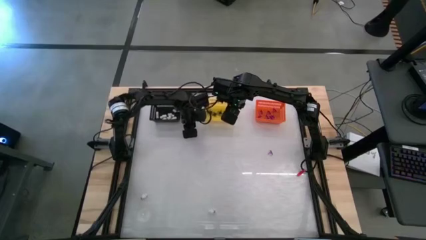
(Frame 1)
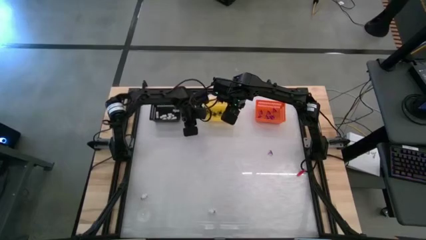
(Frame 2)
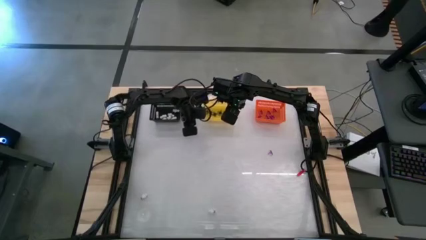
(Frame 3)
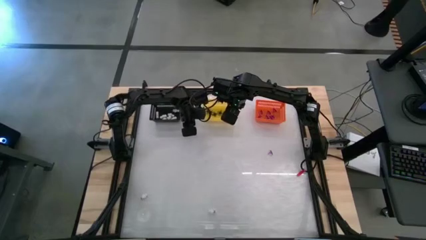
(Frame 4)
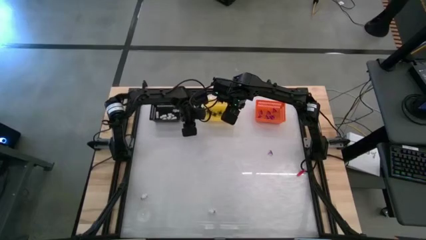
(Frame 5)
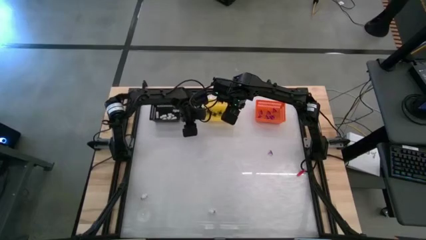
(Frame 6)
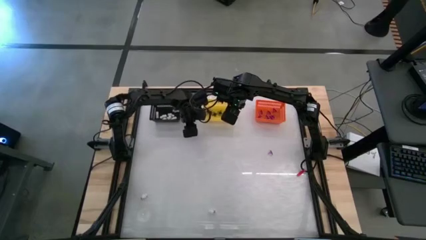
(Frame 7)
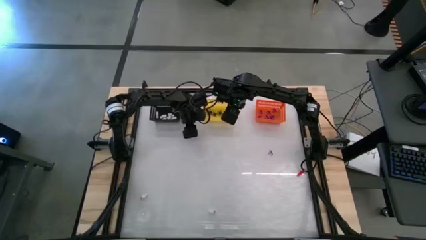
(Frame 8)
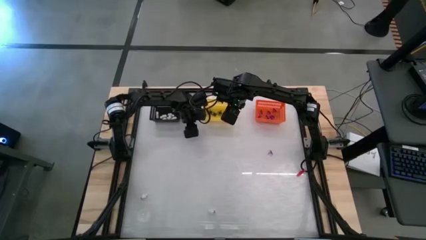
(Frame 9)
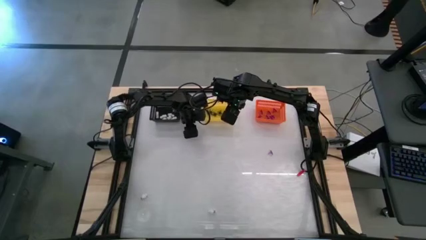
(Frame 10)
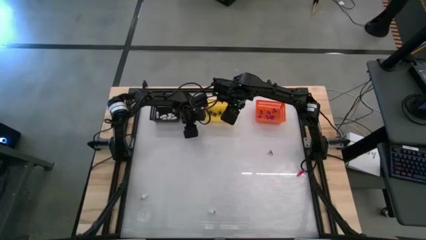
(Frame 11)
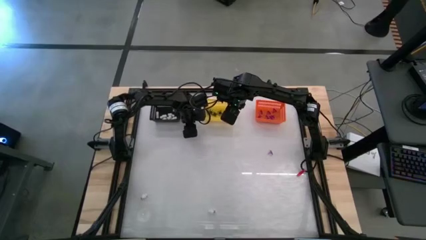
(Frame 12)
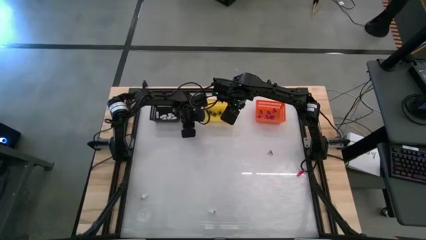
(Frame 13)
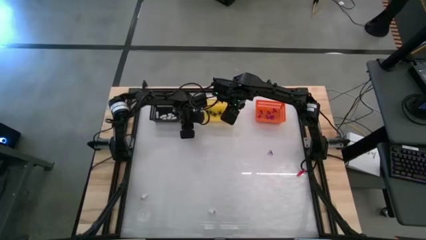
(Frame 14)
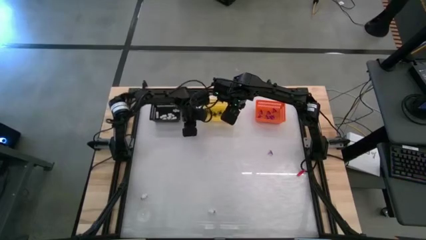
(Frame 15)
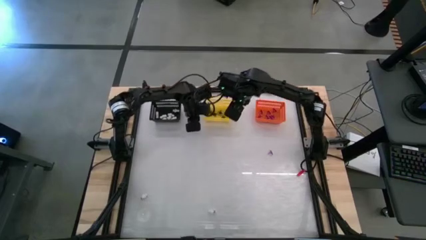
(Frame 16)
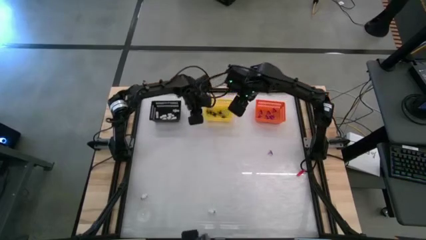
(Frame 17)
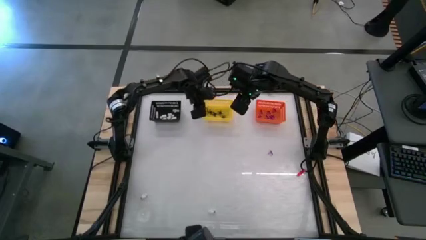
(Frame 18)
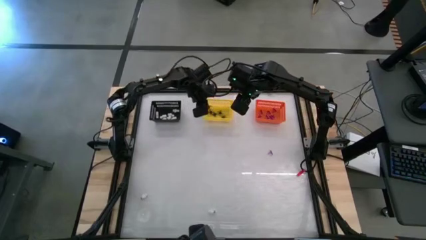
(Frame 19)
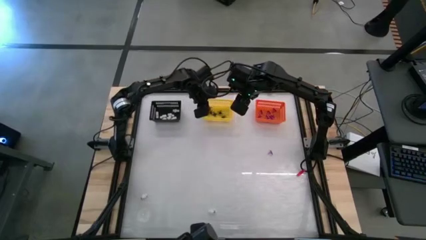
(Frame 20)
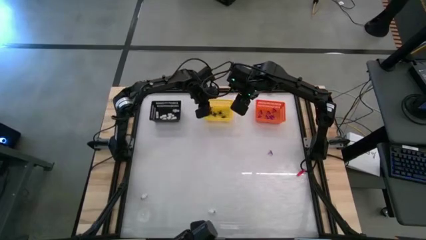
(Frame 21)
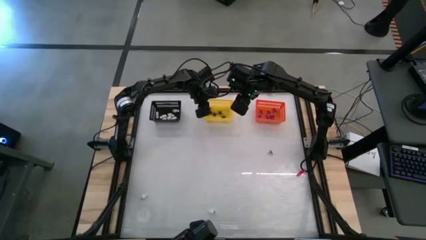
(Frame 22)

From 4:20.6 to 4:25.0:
Task: Sort Halloween decoration
Put the black spider toy into the yellow basket

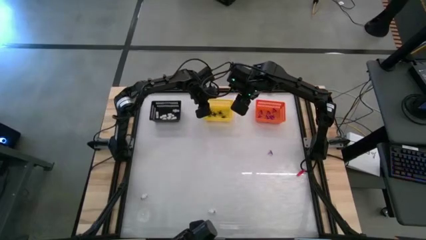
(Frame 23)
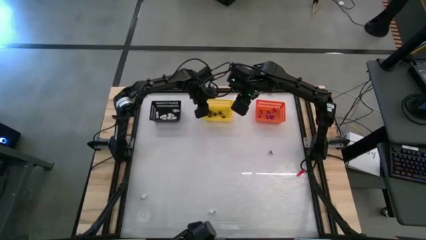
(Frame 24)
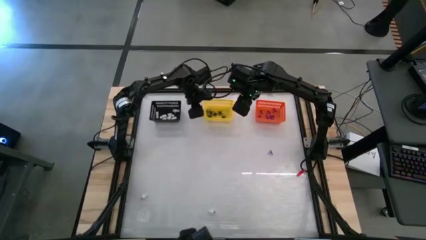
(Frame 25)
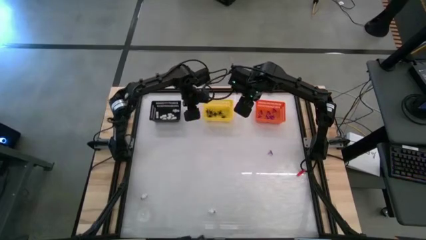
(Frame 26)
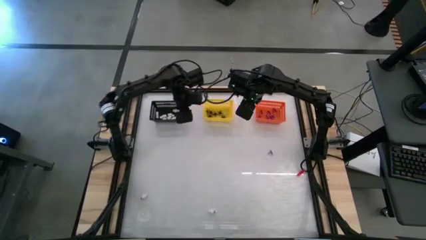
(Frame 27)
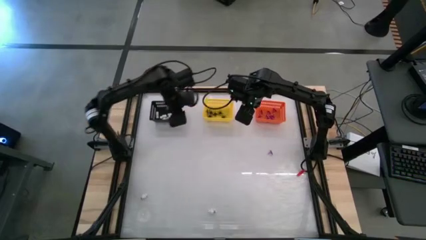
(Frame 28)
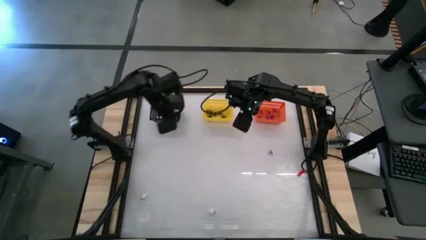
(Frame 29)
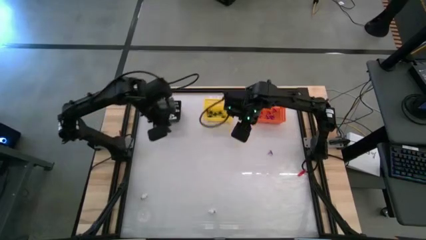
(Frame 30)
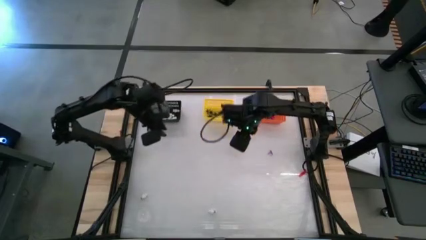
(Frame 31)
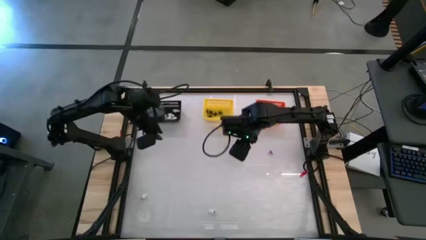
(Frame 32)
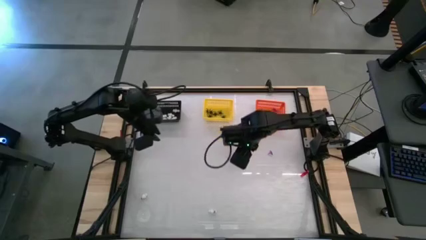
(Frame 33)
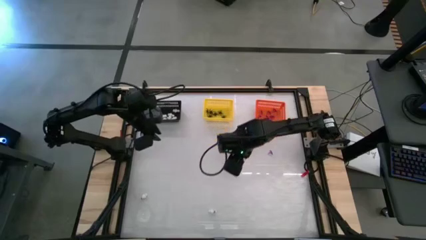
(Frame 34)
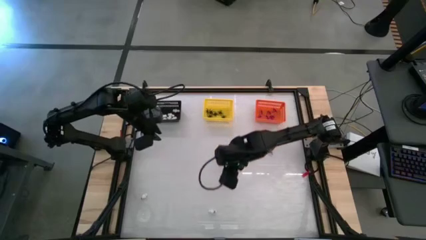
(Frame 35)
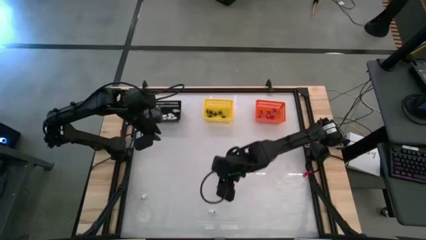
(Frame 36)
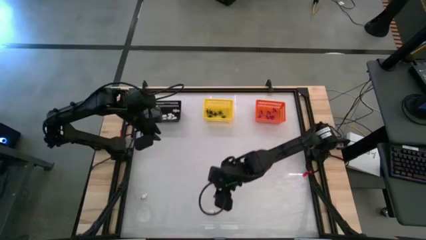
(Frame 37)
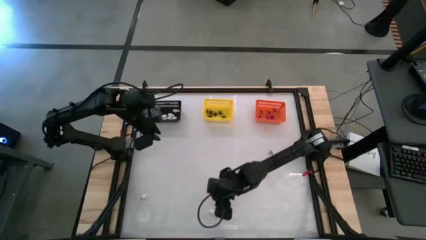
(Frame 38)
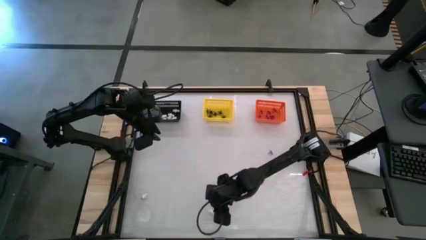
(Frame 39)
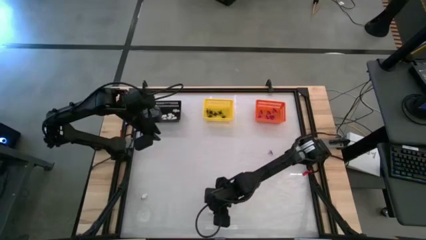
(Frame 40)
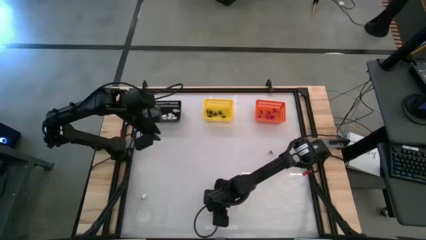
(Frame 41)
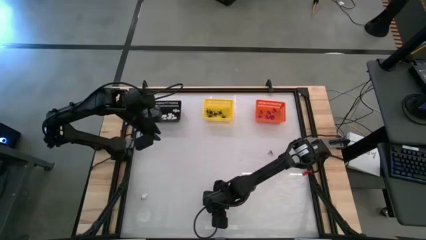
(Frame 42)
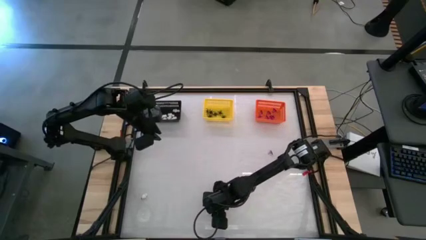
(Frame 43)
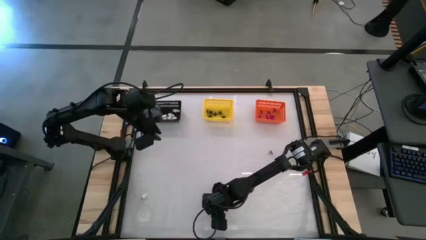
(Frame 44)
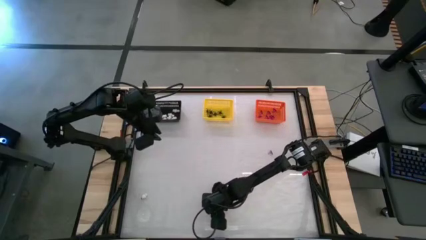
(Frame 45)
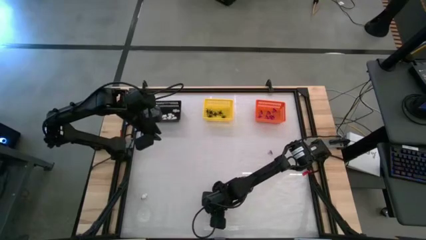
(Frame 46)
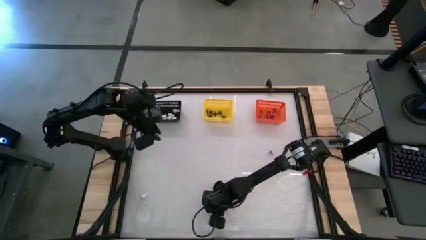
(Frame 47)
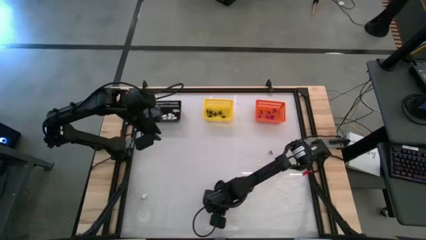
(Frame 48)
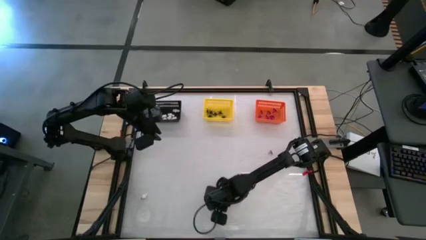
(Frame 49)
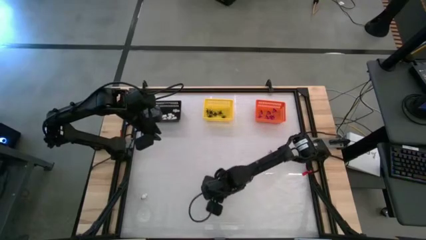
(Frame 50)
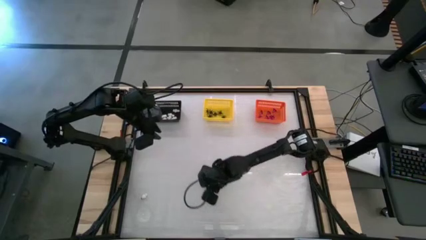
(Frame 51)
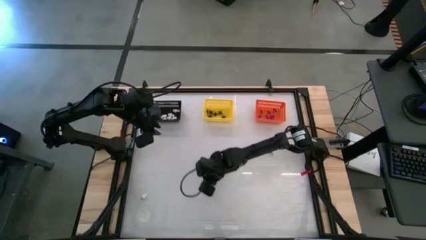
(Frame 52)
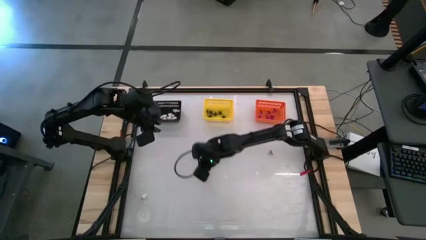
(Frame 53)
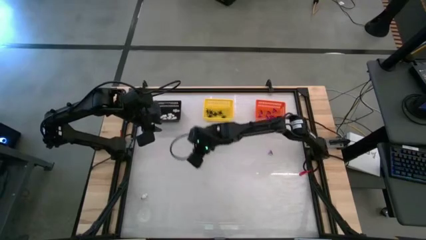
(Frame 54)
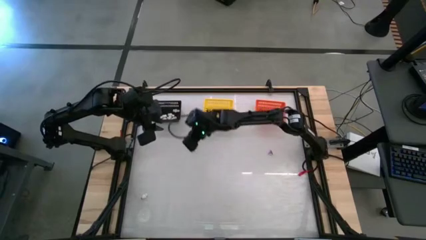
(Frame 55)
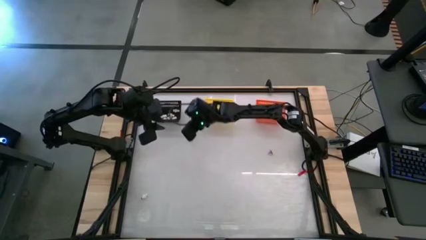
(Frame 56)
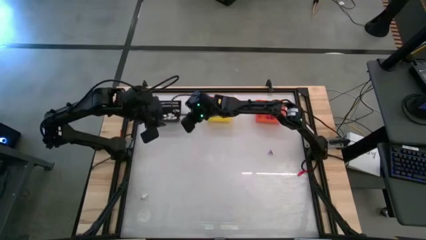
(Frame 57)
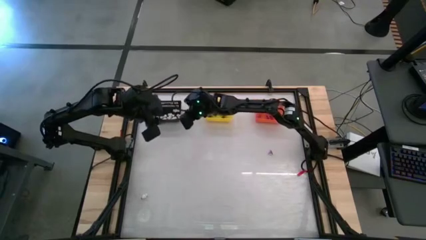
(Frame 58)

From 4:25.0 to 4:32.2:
Put the white skeleton toy into the black basket

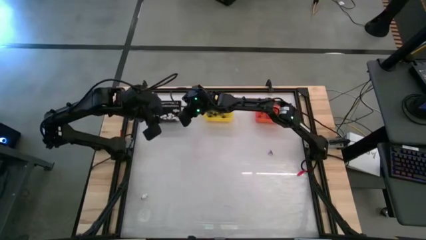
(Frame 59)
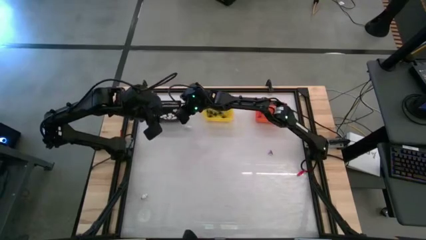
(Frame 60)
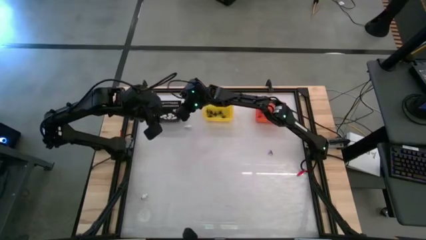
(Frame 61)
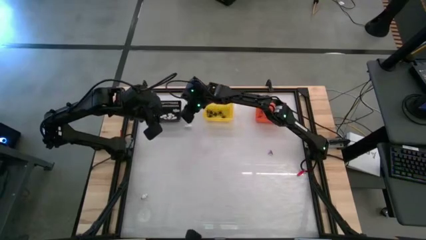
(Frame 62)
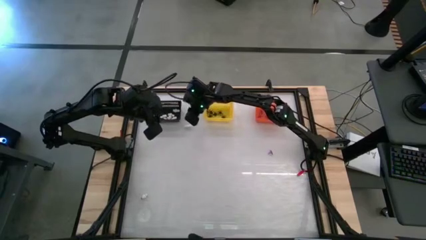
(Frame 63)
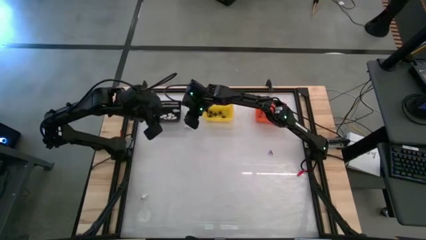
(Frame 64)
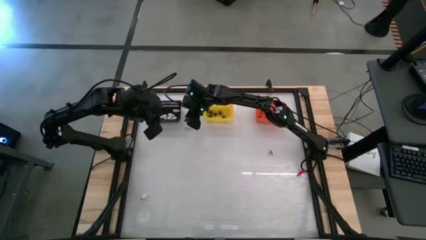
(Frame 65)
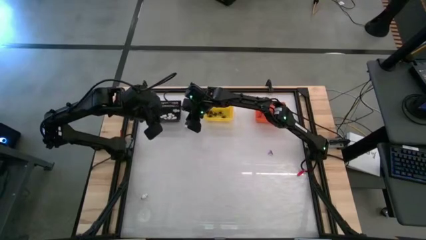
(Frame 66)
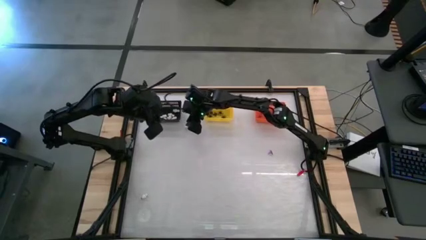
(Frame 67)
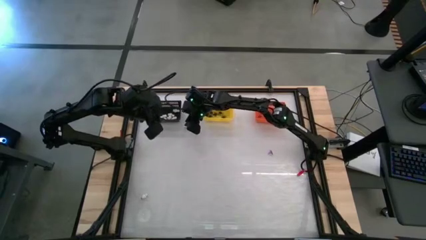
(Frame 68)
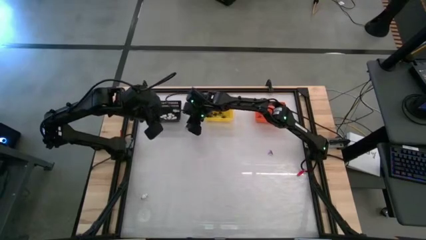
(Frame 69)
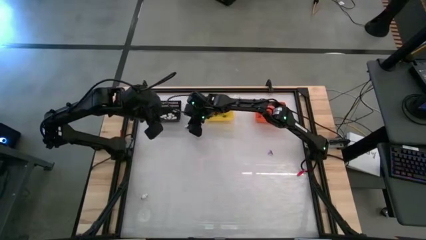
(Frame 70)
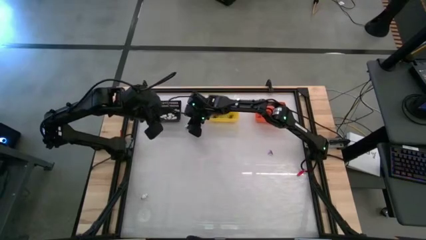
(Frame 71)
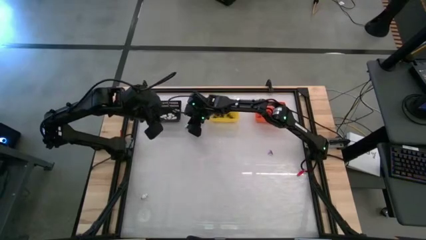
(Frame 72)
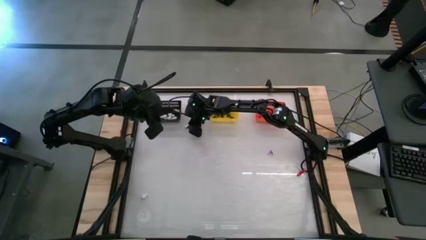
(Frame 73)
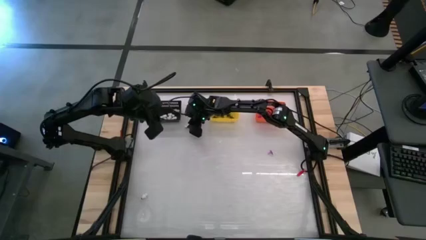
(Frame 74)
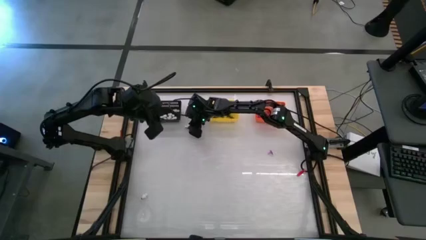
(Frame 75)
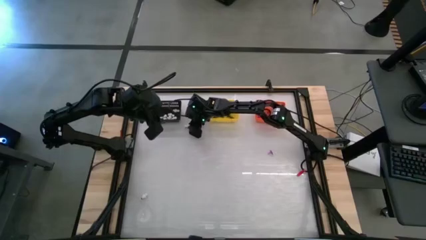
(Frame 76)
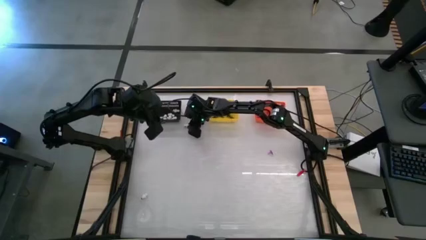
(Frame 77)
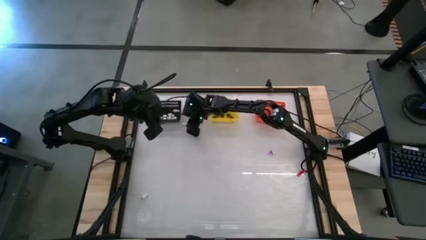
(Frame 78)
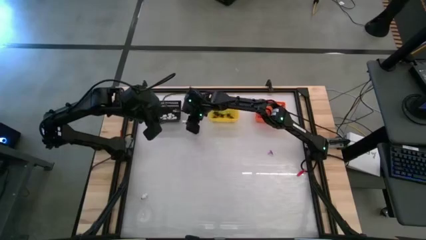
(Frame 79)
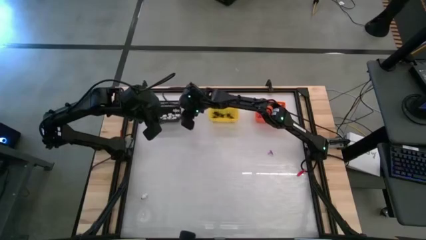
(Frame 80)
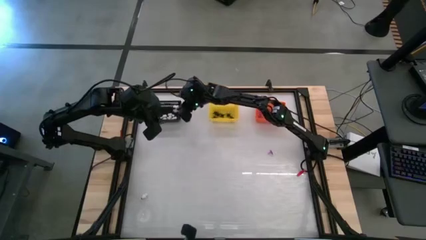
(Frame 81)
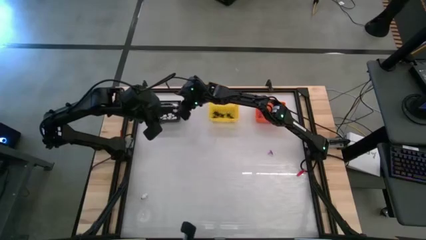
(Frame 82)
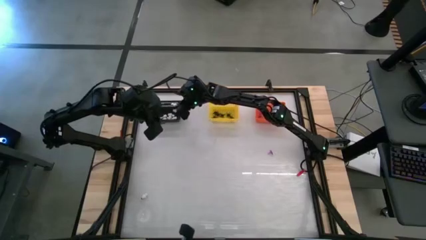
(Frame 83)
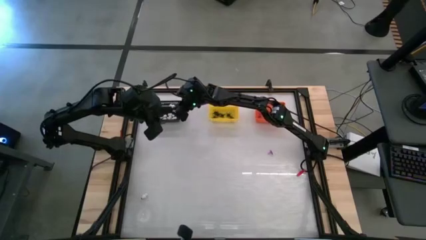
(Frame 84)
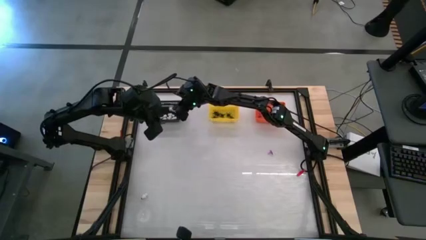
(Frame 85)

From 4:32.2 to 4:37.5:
Put the white skeleton toy into the black basket
